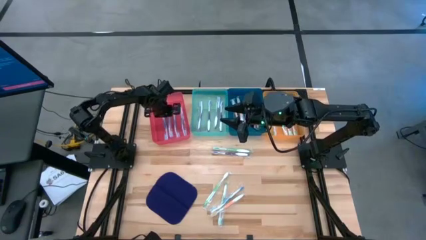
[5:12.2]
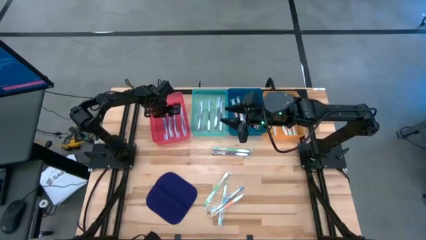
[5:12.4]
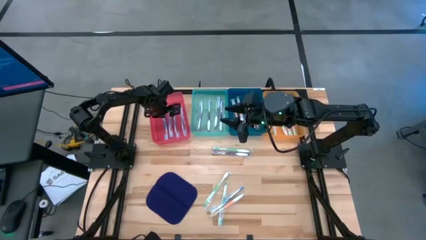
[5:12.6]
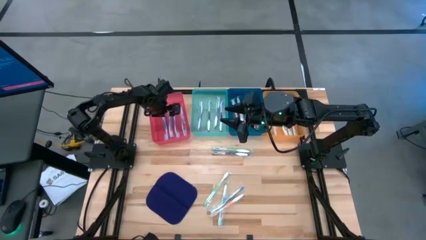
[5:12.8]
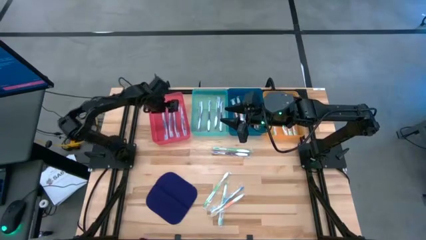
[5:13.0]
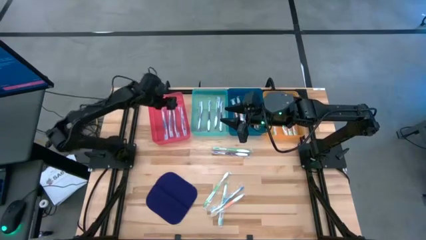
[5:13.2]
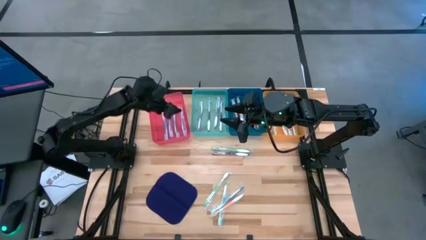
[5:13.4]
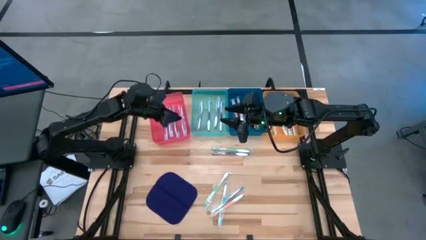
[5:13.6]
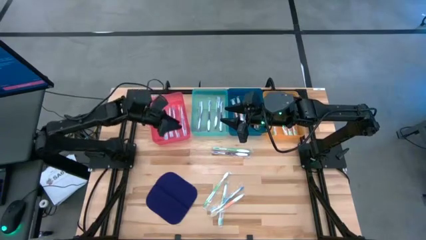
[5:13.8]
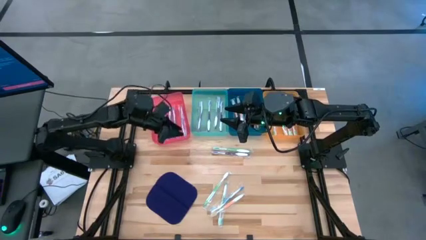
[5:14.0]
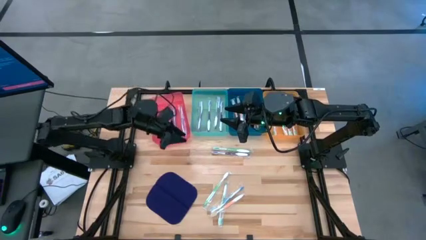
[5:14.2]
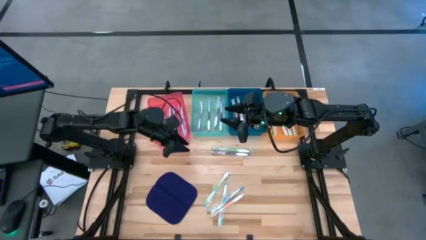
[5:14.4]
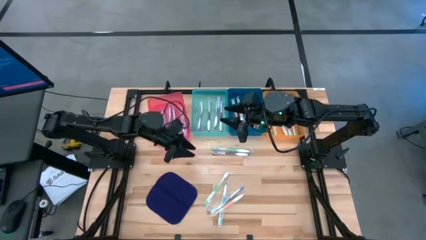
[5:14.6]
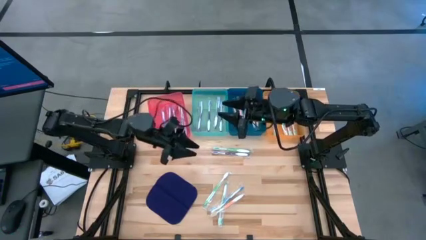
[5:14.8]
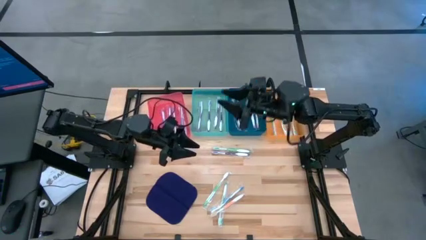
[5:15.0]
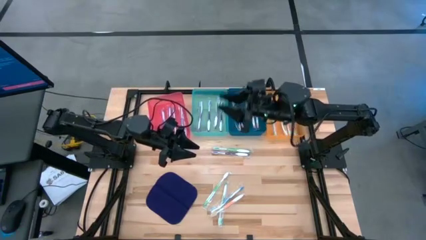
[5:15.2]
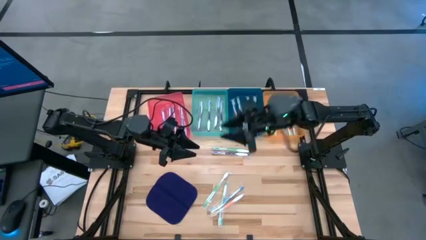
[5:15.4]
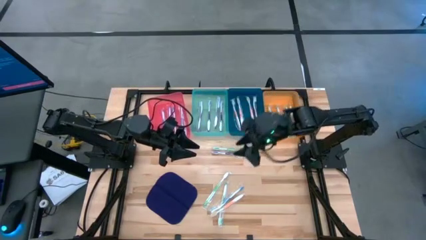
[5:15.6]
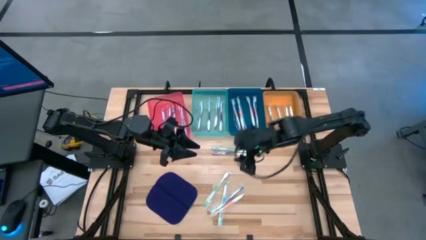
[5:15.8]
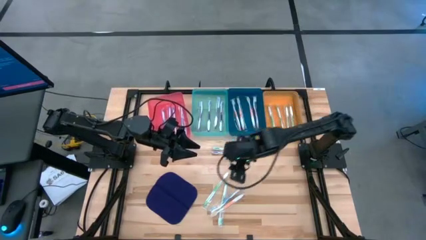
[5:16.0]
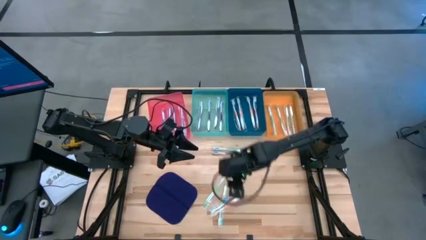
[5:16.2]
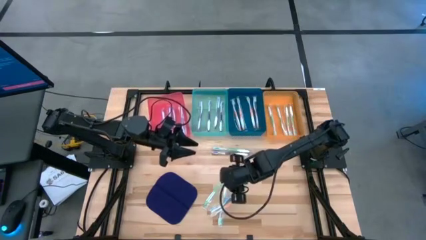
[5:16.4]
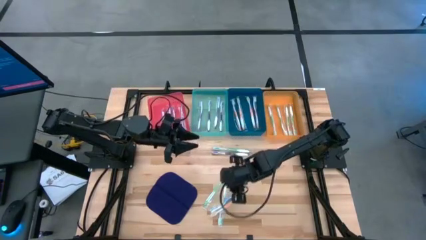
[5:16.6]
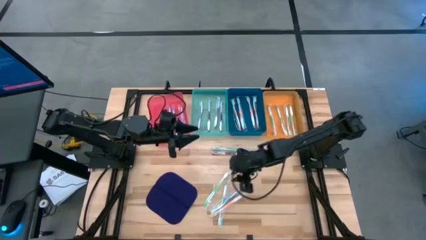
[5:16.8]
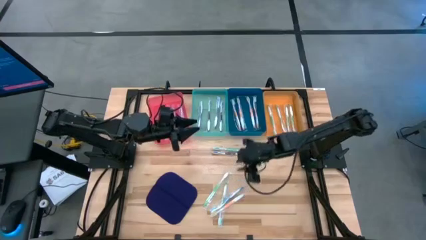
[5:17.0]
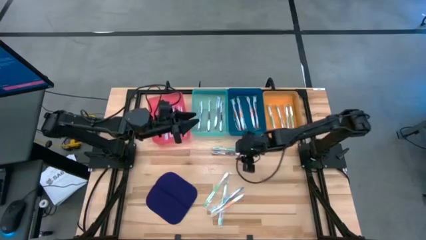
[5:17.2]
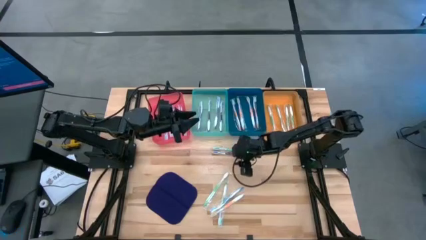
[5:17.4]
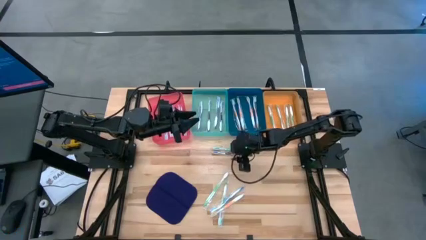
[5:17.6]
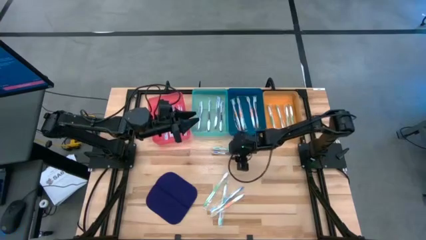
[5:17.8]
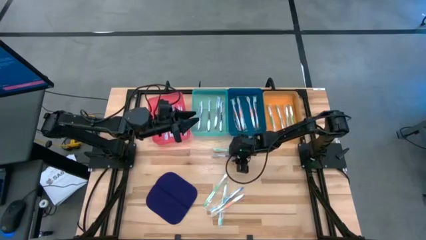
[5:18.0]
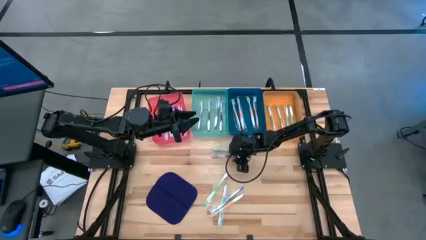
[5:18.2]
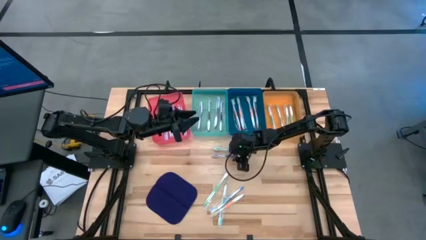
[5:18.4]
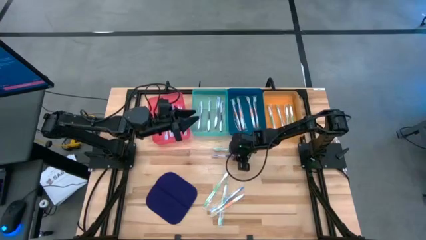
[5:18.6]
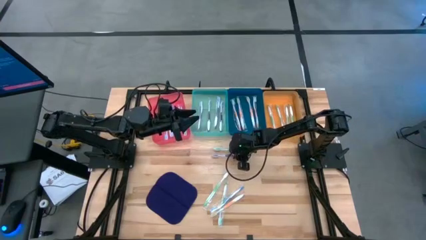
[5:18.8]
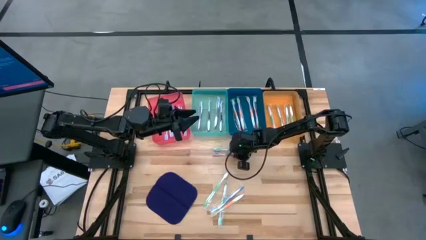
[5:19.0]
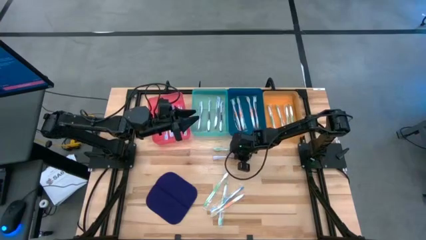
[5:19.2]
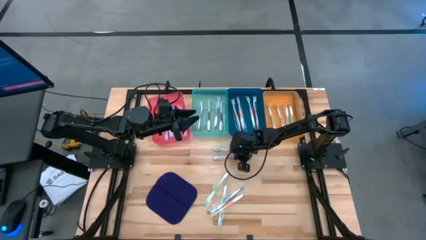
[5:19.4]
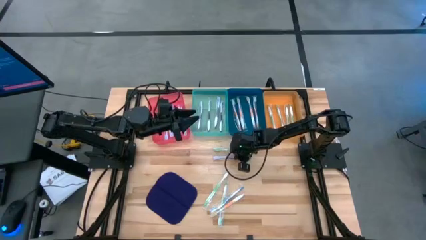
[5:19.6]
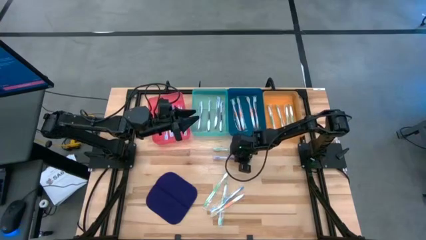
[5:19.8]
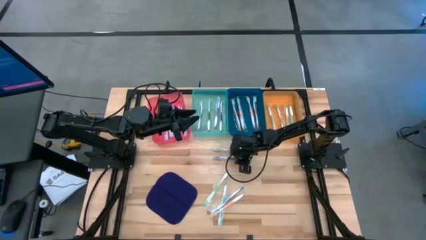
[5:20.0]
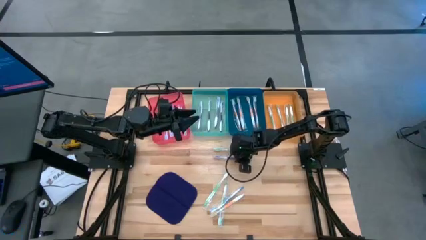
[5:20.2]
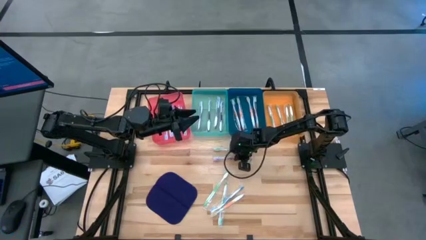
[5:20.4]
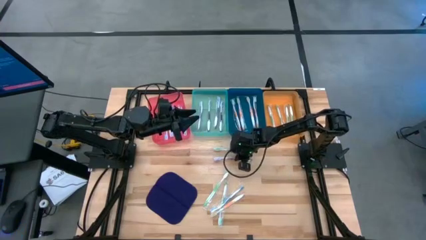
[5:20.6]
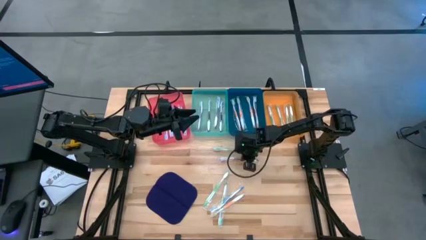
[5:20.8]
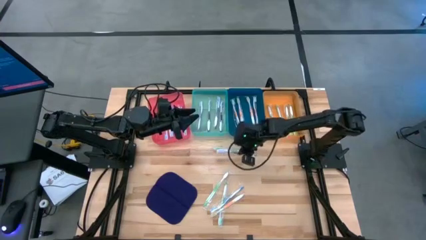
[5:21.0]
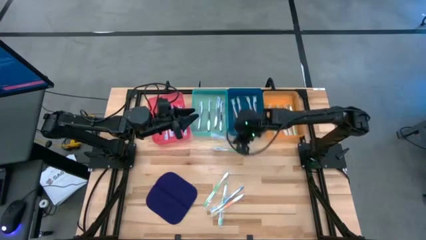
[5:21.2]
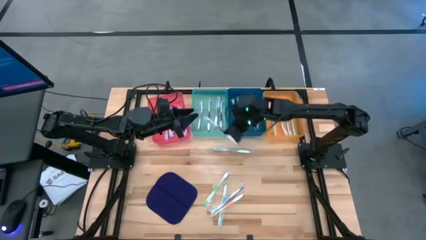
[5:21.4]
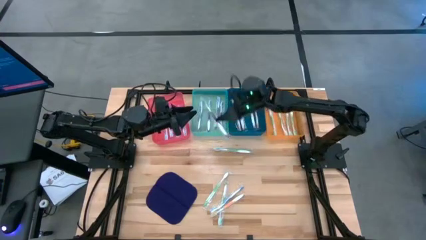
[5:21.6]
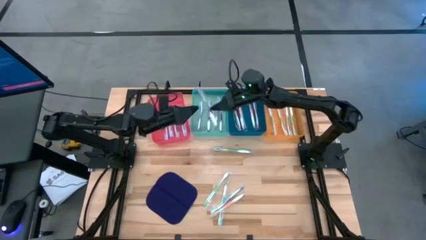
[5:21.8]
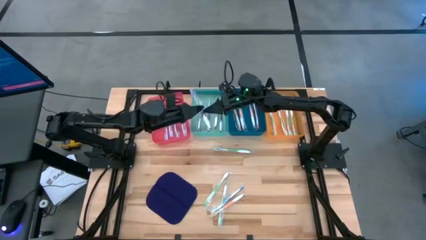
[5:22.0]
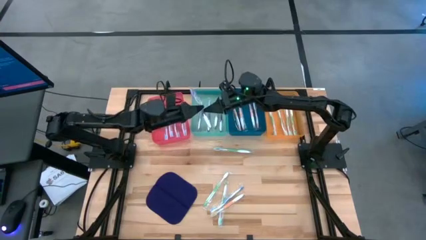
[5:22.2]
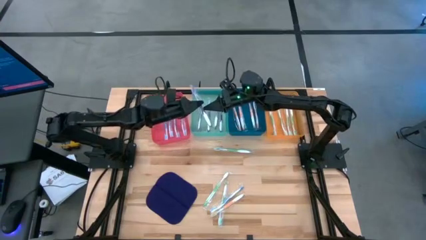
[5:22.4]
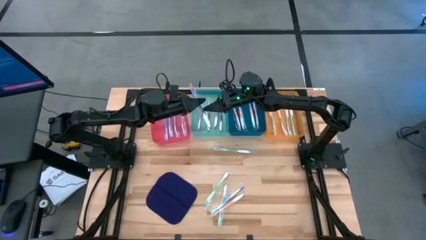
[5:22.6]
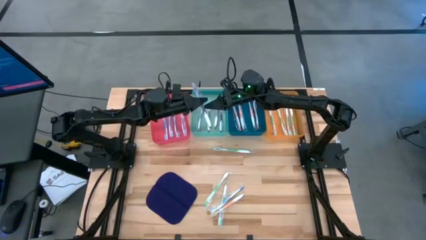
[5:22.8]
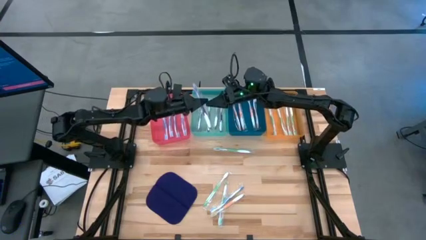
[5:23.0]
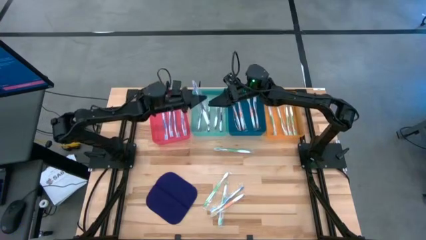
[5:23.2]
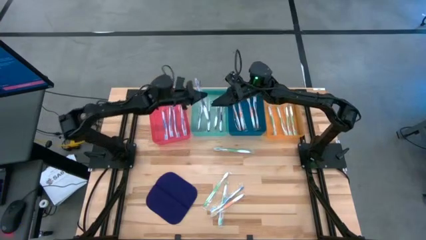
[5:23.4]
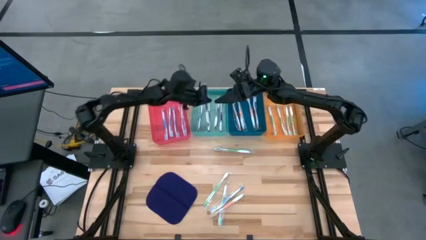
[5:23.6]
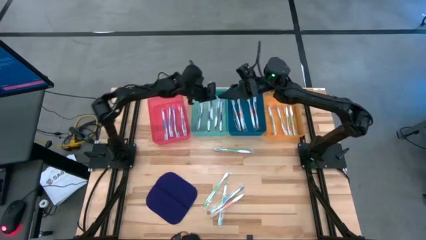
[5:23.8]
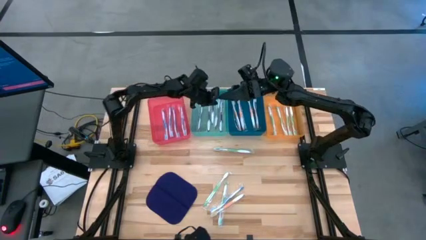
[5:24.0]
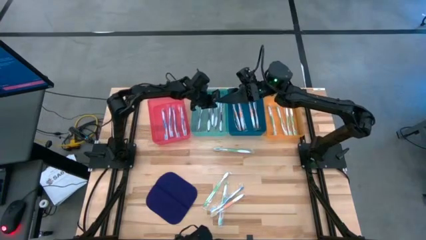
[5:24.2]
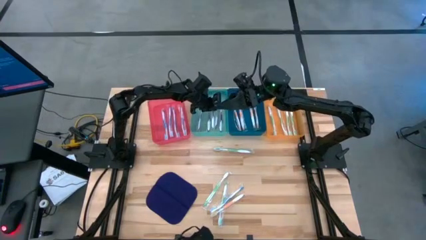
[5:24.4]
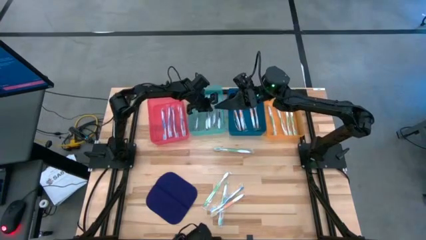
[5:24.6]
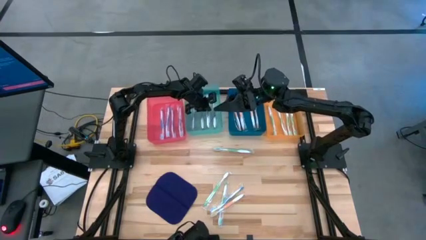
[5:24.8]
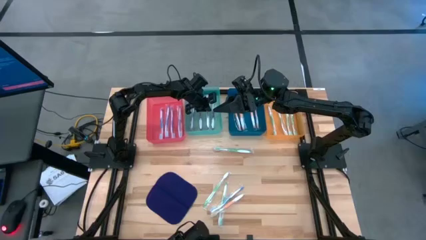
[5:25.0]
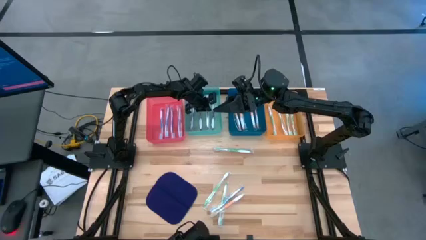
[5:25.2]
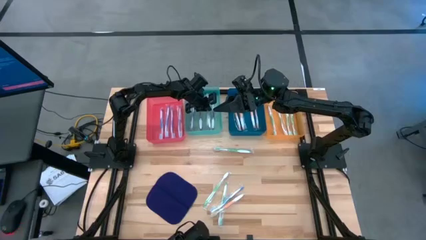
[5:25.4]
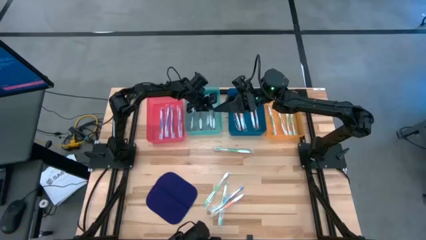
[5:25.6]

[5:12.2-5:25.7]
Task: Pick & Place Toothbrushes
Put the purple toothbrush into the green bin

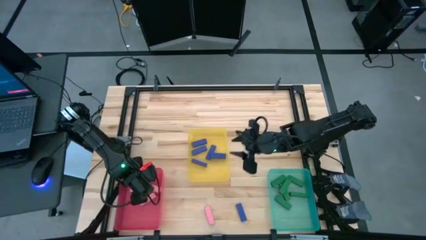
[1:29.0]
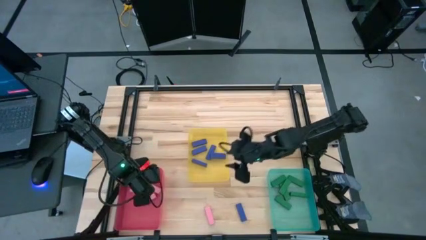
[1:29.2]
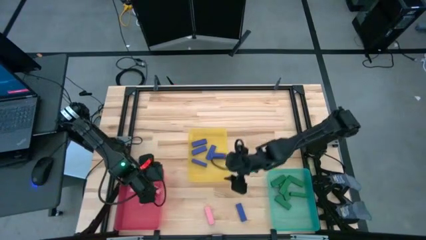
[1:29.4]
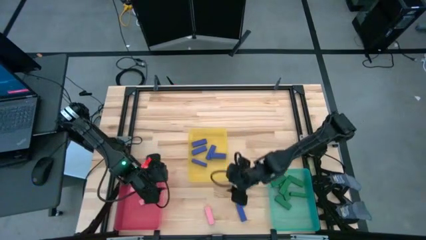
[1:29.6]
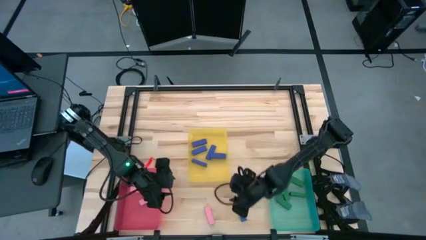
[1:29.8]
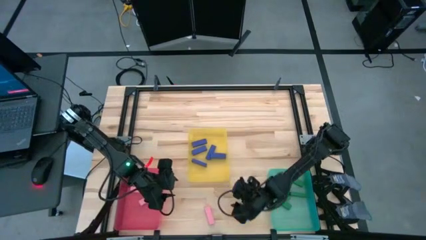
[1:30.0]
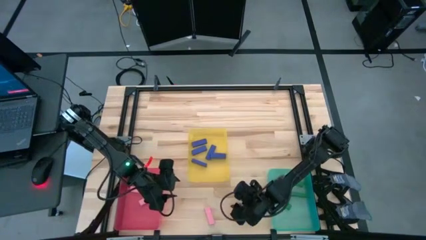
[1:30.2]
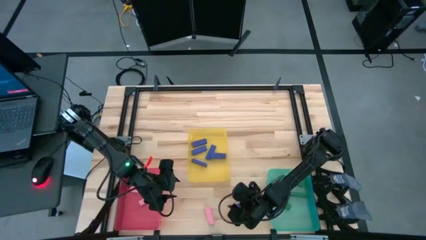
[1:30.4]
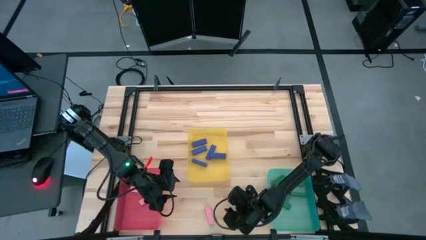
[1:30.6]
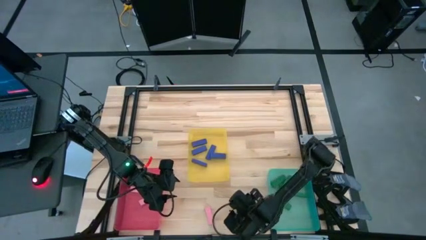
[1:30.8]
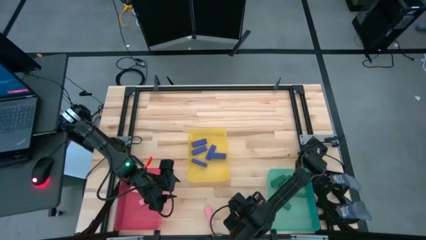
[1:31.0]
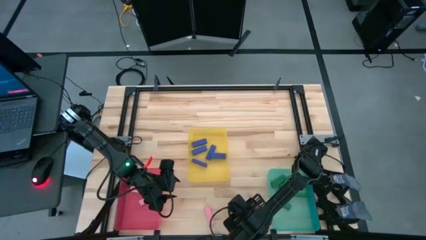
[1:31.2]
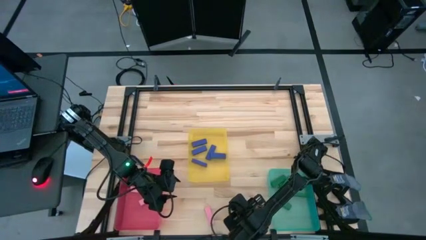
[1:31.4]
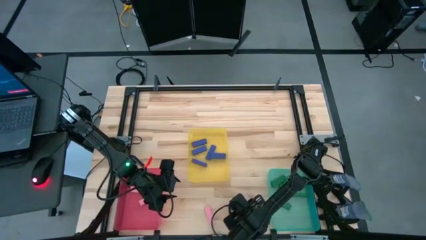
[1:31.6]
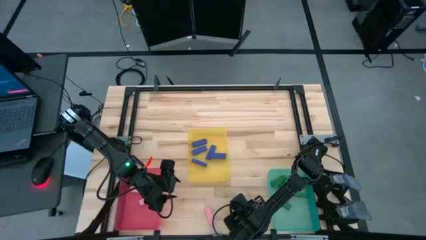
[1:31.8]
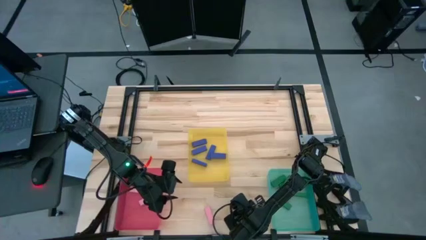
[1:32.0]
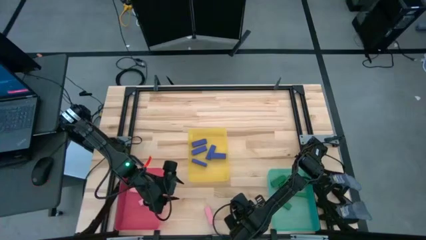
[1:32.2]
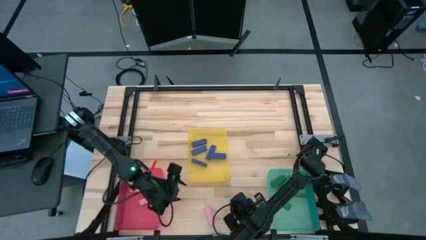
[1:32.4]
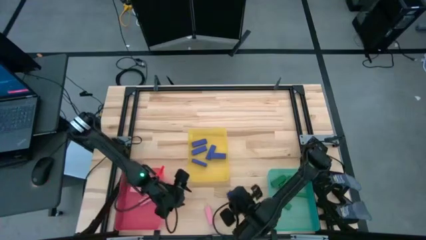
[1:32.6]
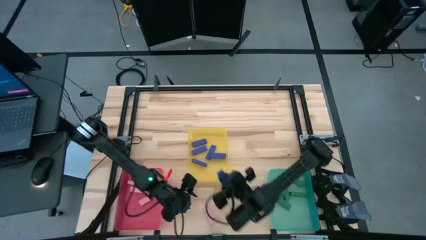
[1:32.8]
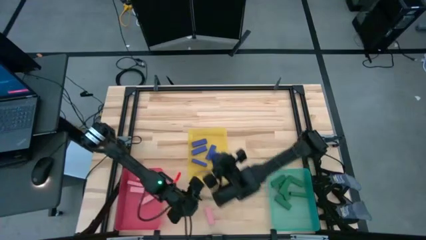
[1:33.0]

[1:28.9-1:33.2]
Task: Sort blocks
Put the blue block into the yellow bin
